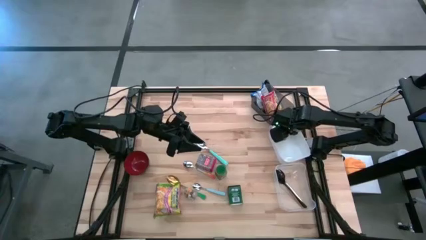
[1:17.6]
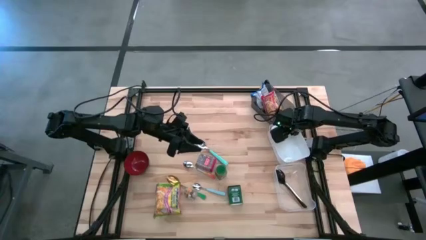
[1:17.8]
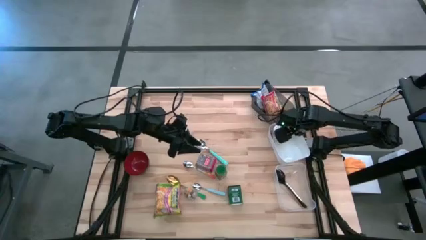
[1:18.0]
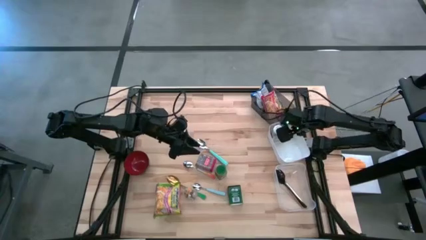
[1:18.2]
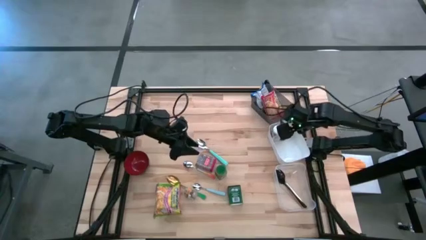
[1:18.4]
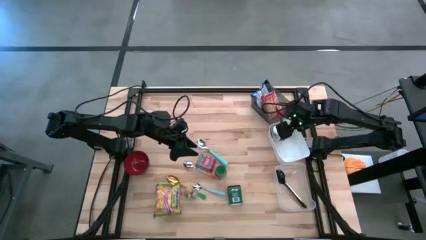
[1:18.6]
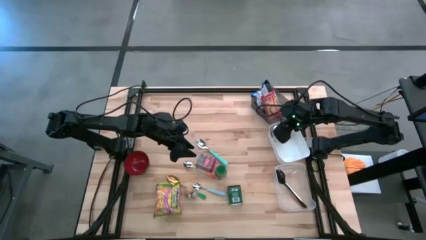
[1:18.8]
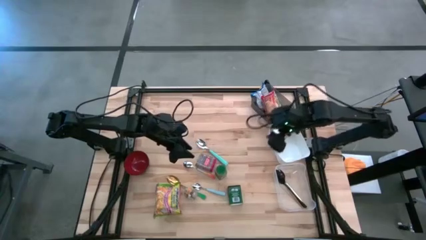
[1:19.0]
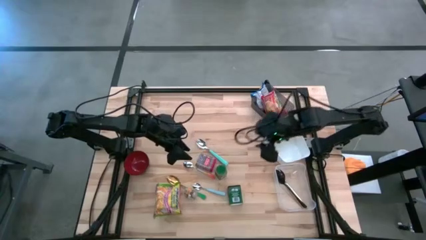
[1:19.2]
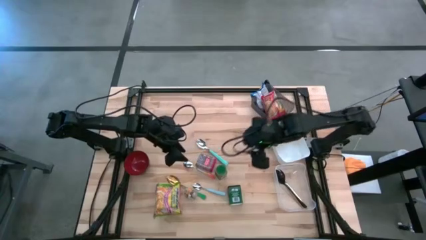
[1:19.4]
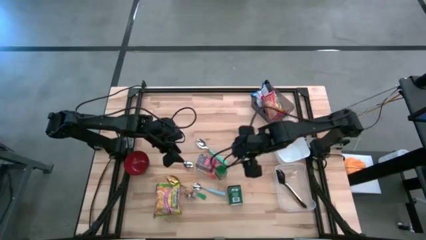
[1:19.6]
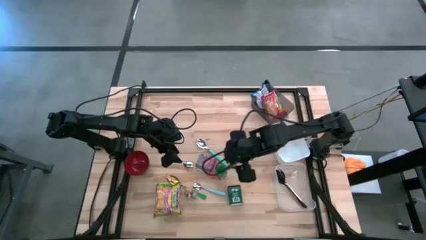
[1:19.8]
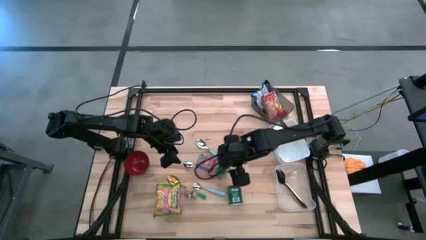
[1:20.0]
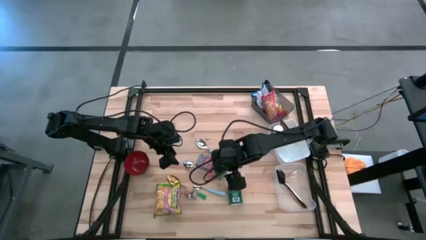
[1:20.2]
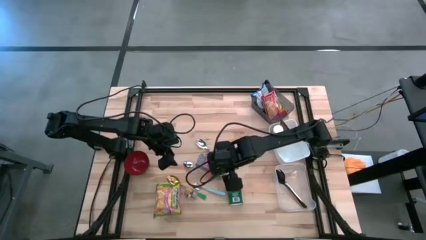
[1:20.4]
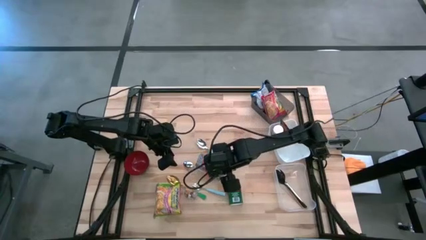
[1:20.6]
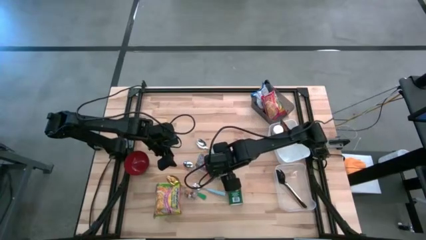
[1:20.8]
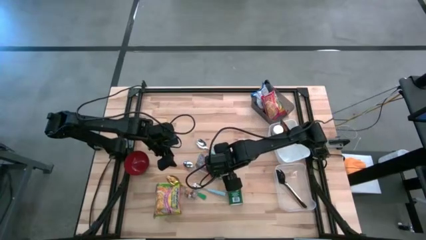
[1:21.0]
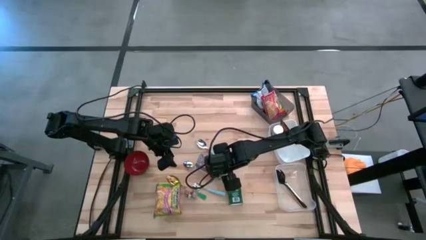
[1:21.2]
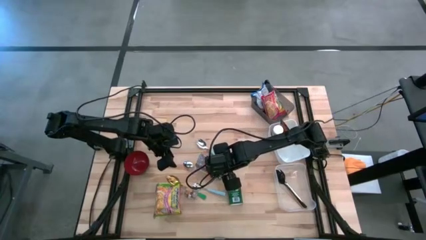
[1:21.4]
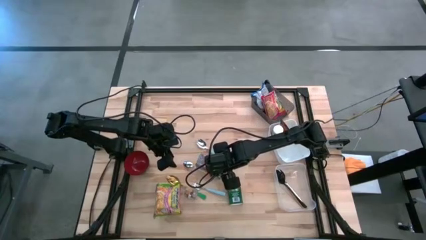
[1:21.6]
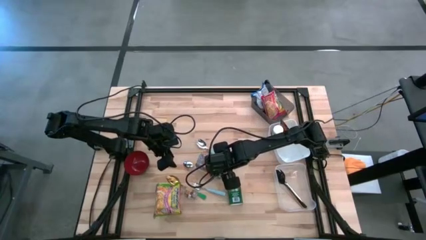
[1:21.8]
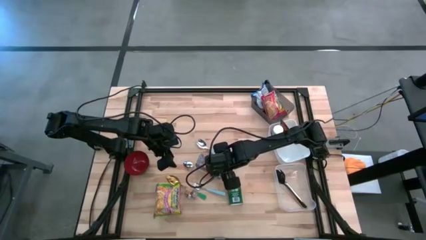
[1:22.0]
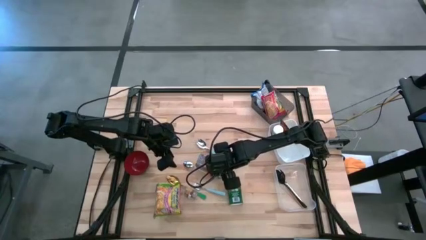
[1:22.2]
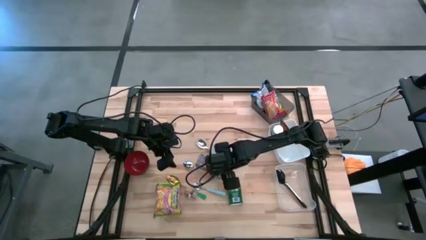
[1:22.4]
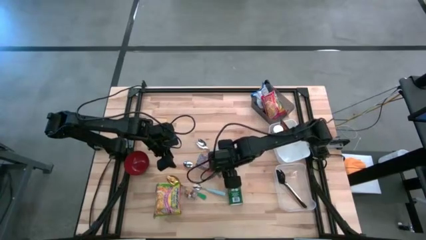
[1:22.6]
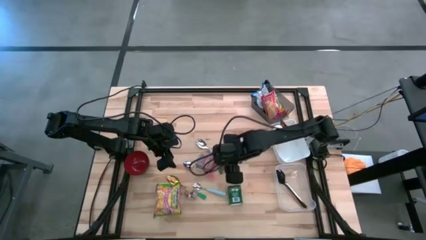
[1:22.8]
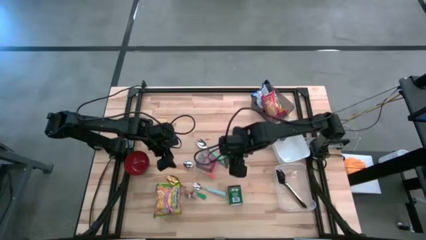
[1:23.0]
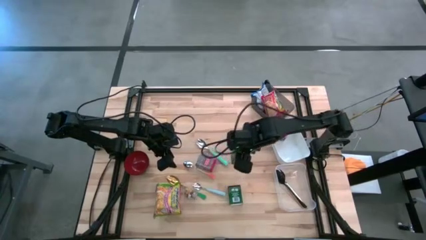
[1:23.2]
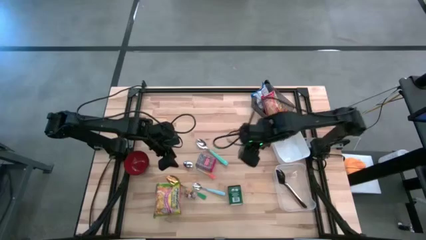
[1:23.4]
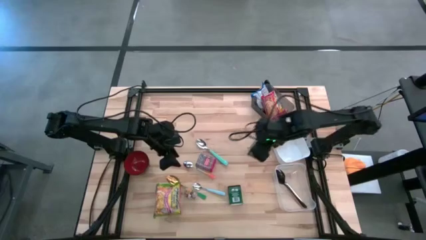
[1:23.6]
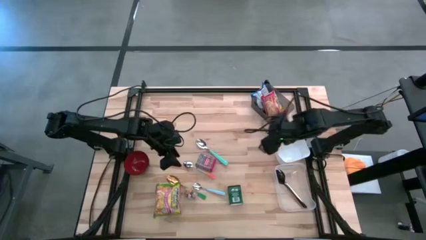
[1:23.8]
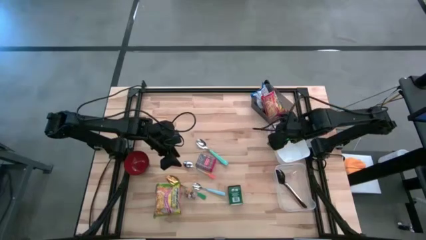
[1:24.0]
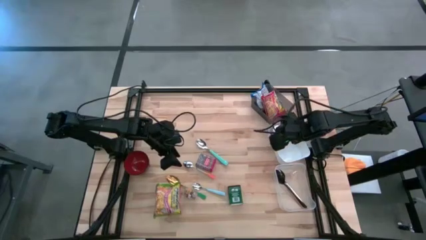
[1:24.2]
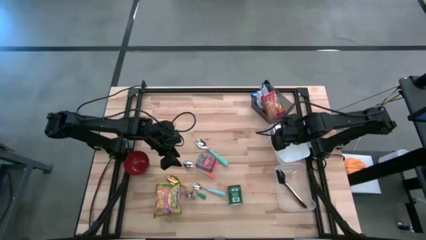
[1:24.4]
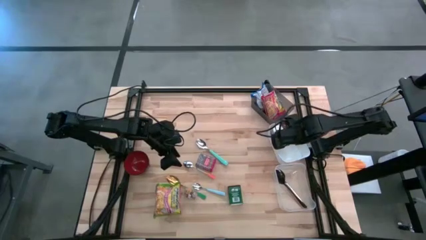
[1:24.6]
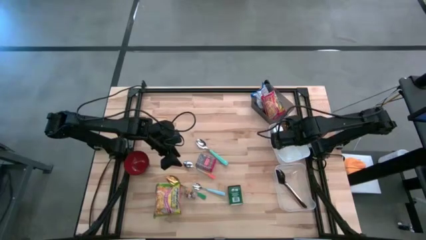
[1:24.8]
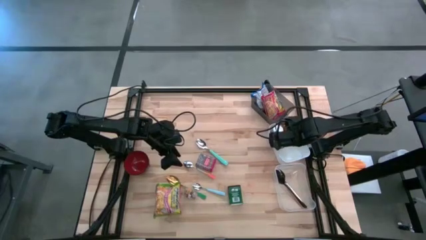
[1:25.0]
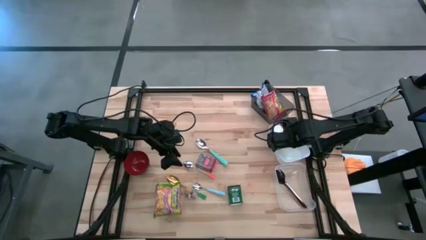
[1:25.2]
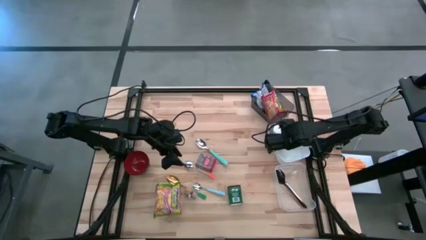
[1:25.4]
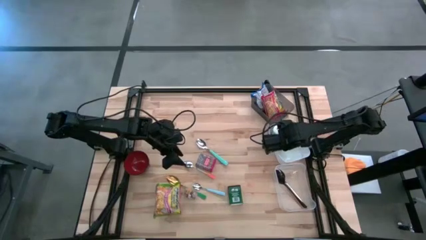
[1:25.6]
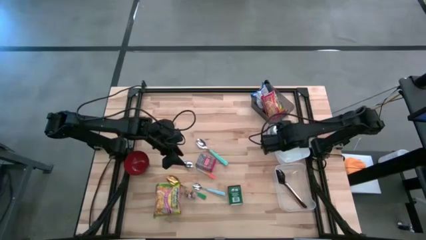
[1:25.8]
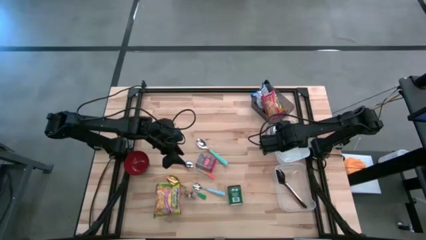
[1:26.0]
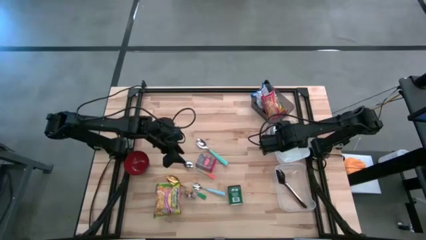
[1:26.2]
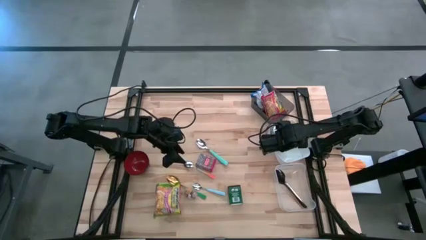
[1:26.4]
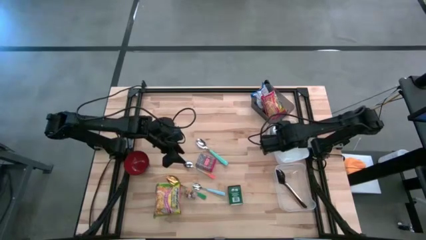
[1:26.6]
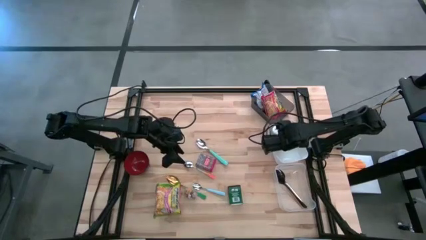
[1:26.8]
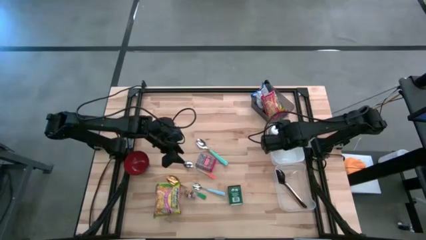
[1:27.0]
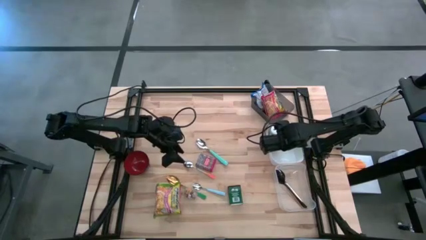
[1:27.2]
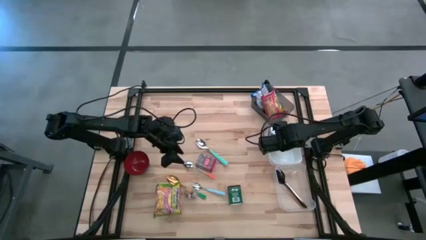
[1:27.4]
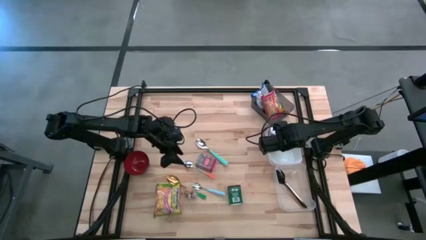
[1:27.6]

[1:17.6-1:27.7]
Put the green seasoning bottle into the white bin

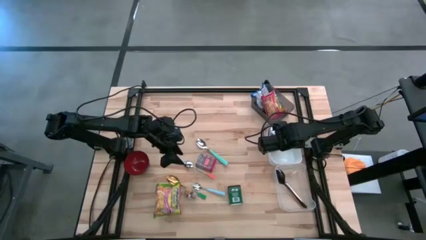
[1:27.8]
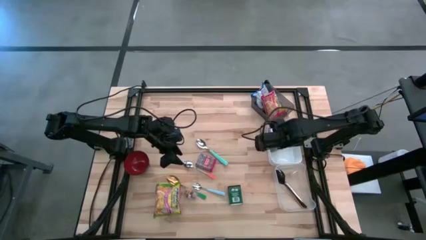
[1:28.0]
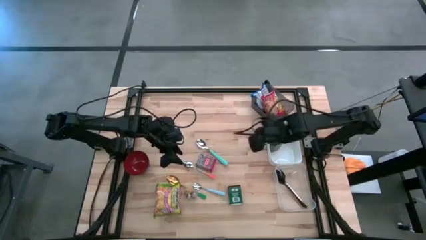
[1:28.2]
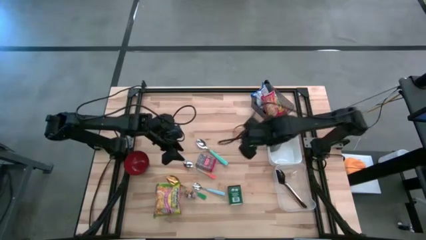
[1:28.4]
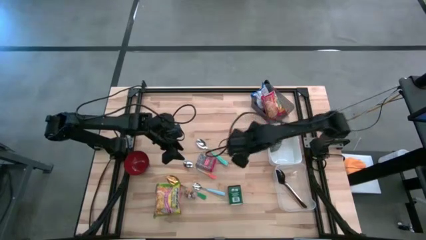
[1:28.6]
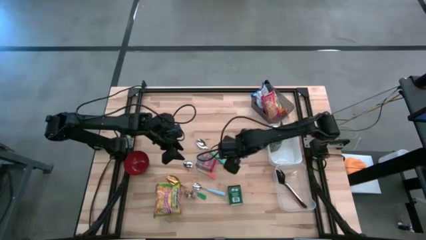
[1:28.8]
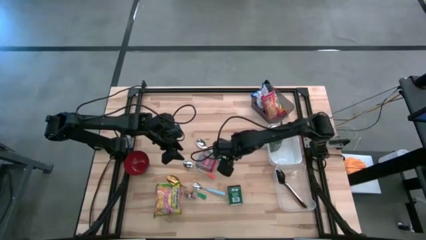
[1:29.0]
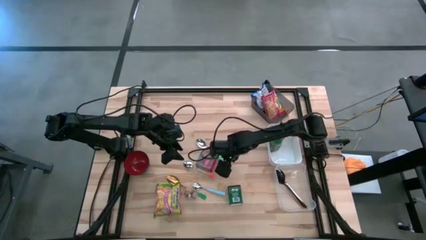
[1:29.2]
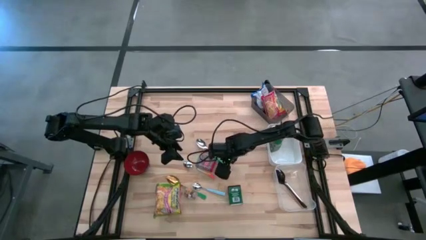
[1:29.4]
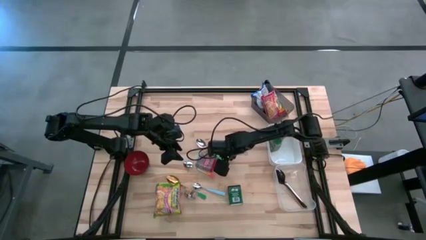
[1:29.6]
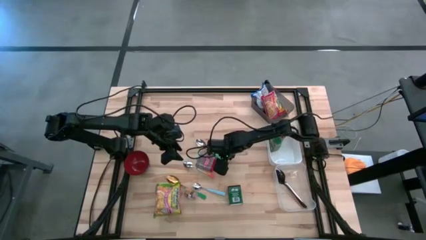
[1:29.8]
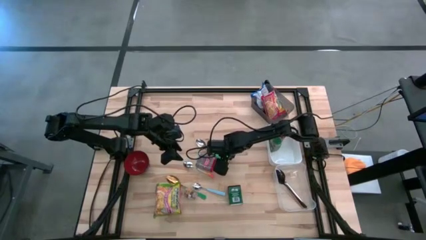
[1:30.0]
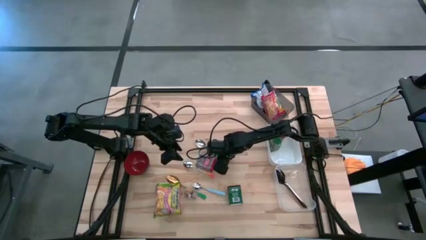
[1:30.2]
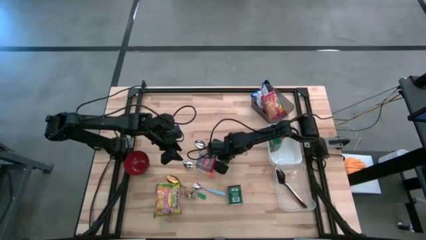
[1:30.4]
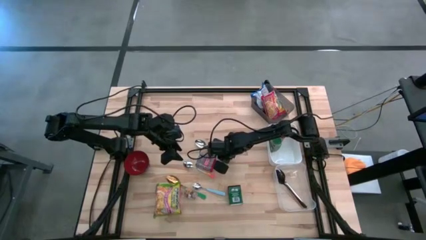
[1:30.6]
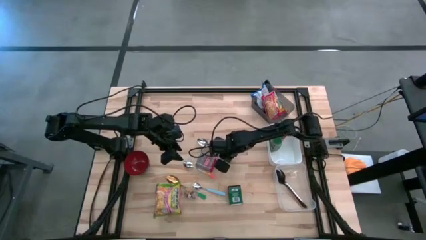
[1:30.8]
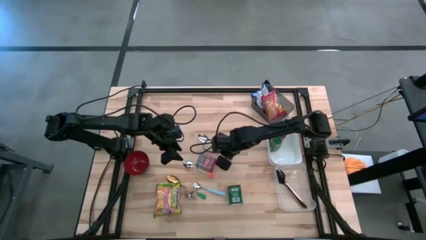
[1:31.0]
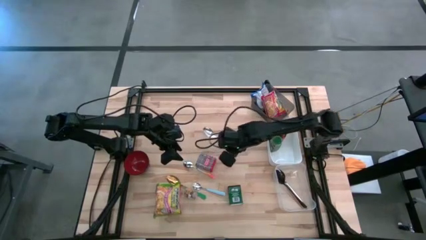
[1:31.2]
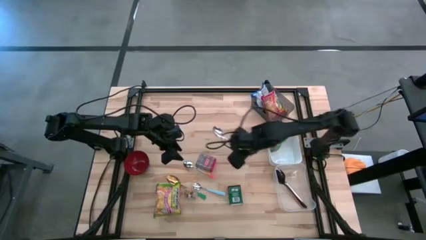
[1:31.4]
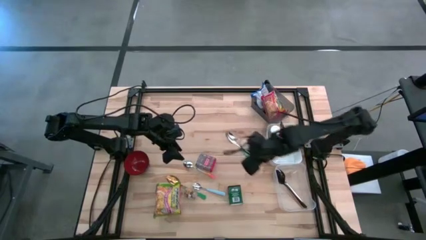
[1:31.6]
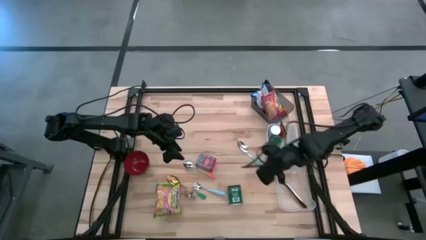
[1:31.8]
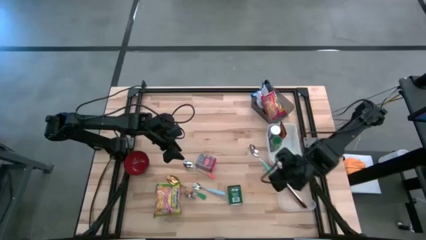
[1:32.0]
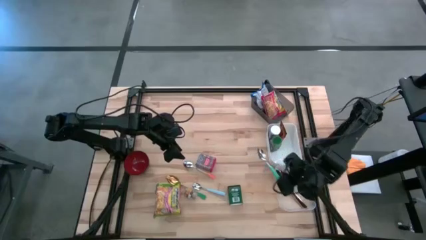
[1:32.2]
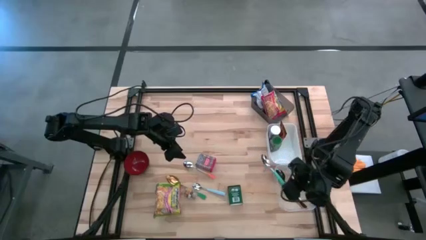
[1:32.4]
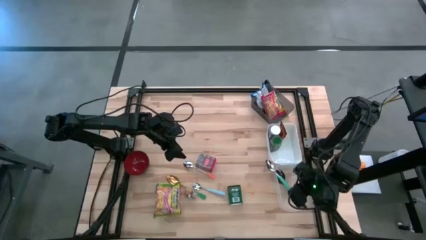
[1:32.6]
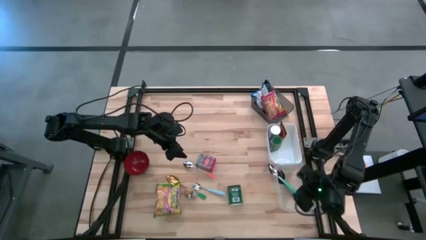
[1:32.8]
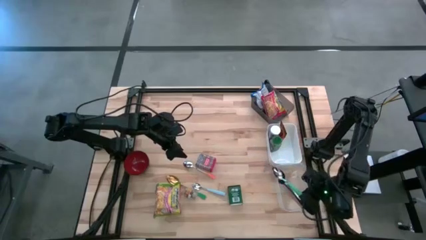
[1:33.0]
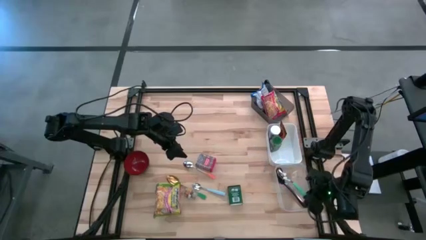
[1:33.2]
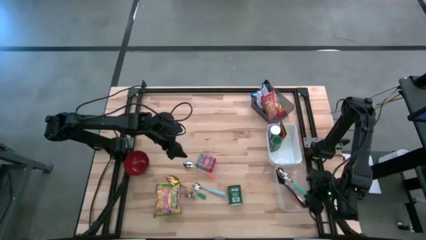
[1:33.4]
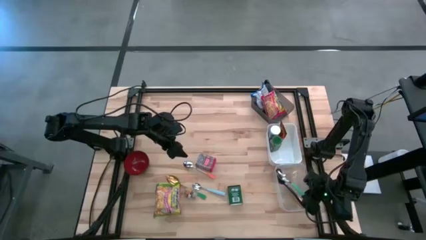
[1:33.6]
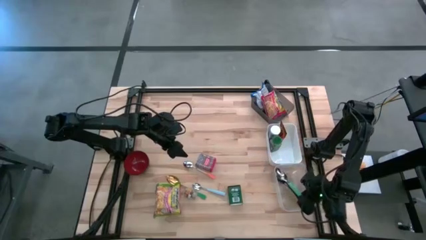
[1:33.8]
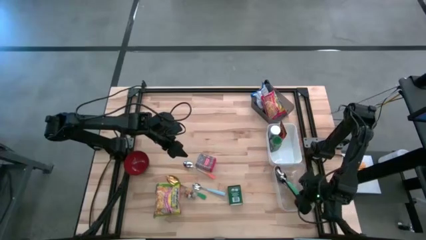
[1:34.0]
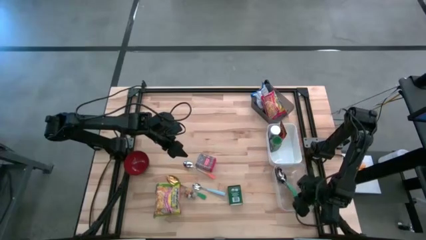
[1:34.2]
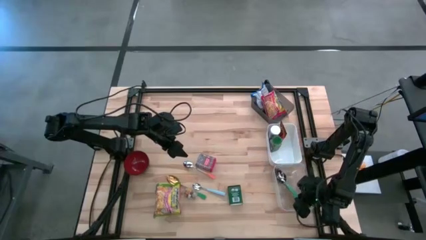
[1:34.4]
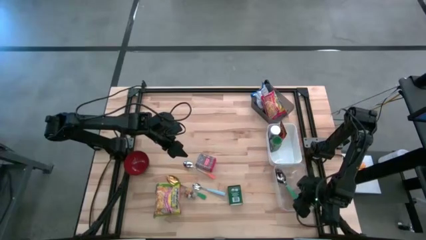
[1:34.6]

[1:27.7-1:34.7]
Put the top blue spoon into the transparent bin
